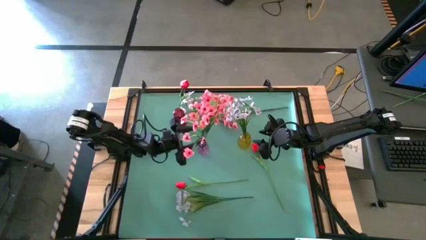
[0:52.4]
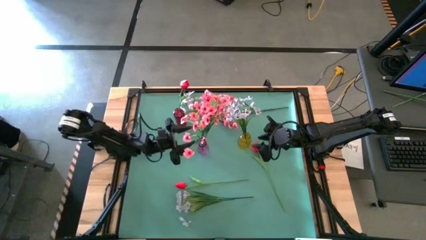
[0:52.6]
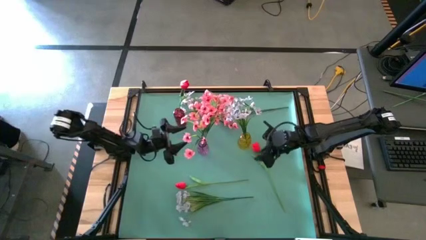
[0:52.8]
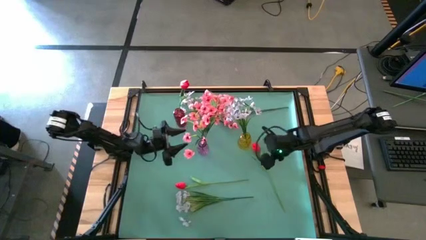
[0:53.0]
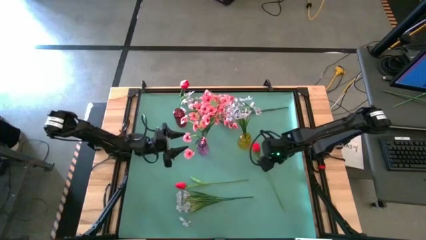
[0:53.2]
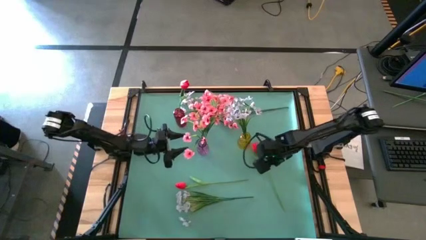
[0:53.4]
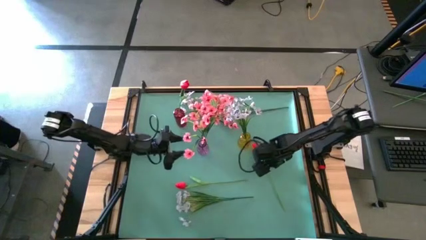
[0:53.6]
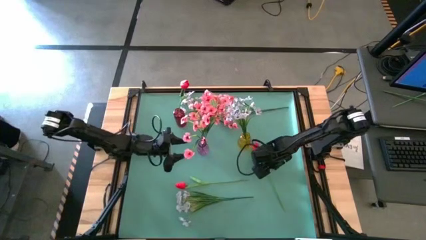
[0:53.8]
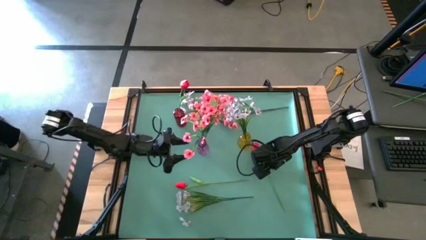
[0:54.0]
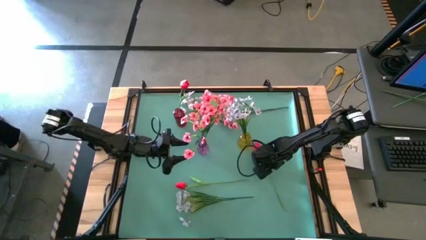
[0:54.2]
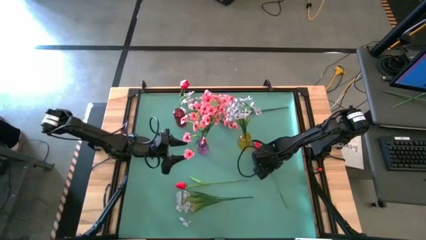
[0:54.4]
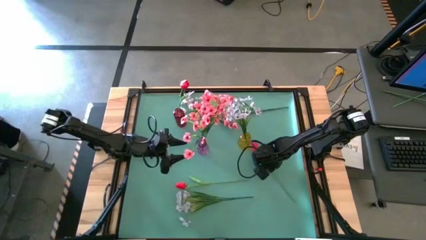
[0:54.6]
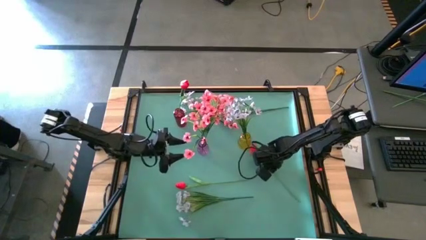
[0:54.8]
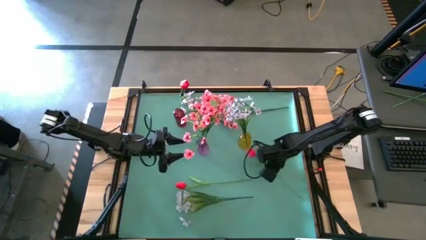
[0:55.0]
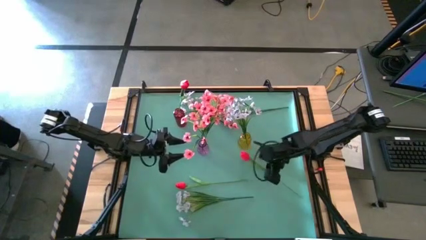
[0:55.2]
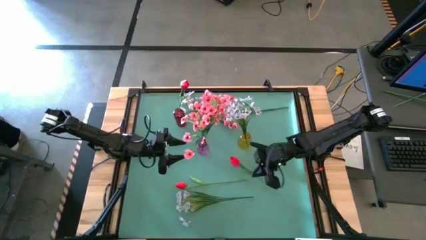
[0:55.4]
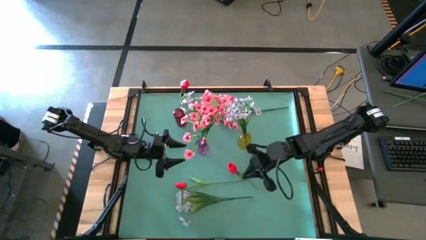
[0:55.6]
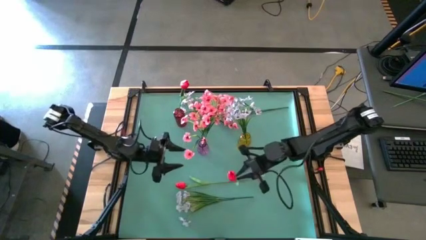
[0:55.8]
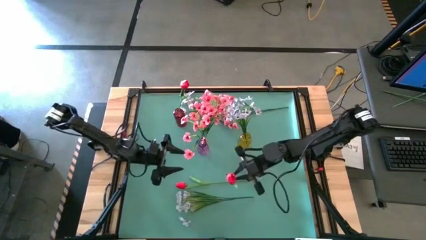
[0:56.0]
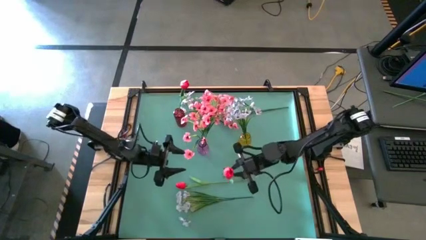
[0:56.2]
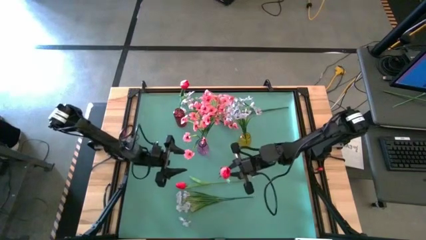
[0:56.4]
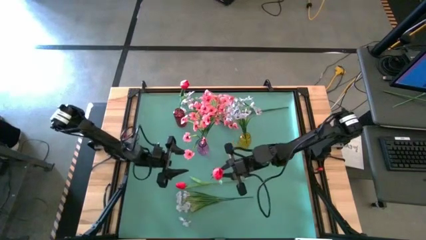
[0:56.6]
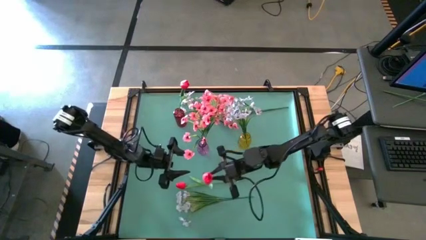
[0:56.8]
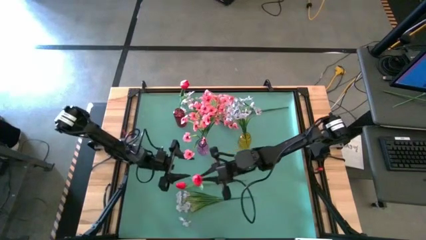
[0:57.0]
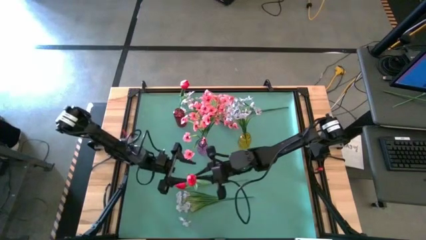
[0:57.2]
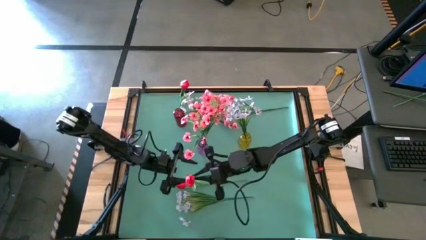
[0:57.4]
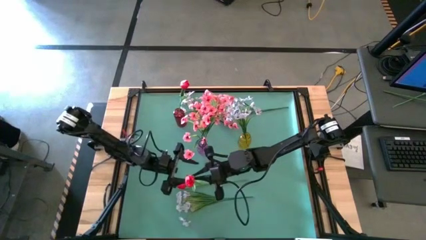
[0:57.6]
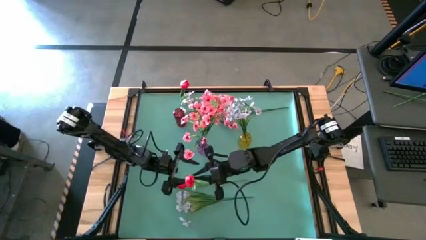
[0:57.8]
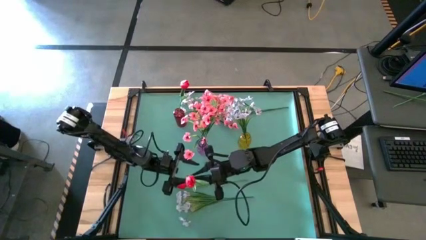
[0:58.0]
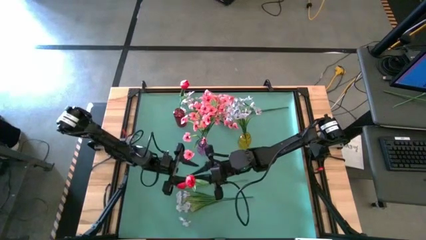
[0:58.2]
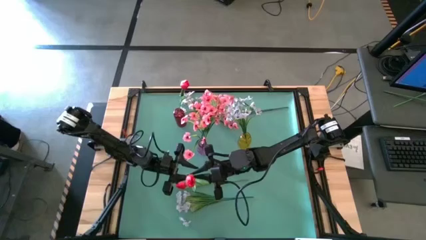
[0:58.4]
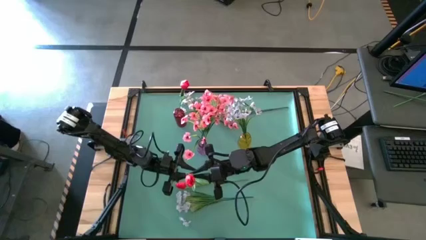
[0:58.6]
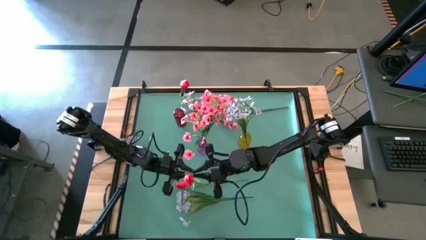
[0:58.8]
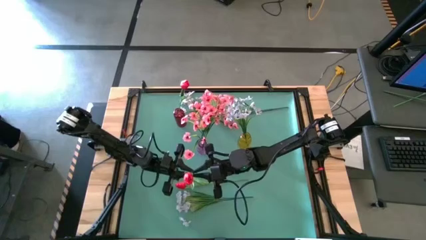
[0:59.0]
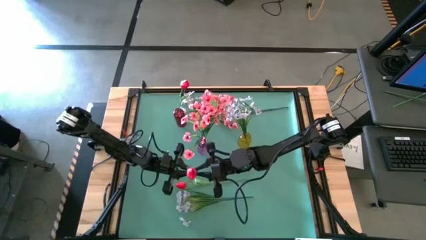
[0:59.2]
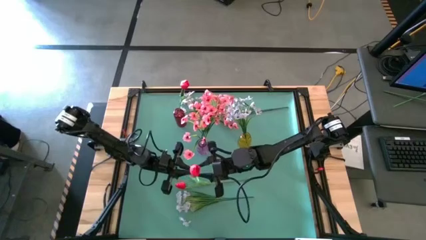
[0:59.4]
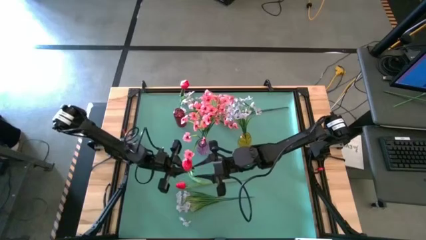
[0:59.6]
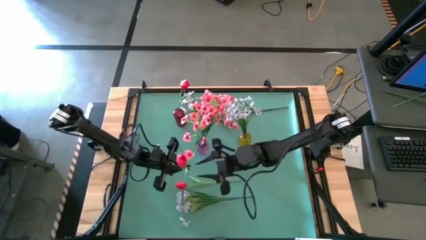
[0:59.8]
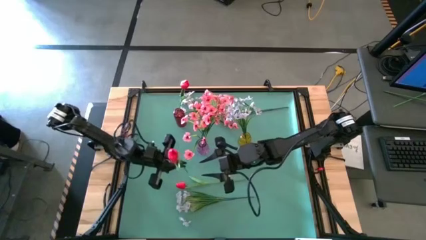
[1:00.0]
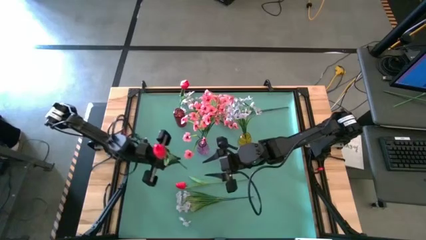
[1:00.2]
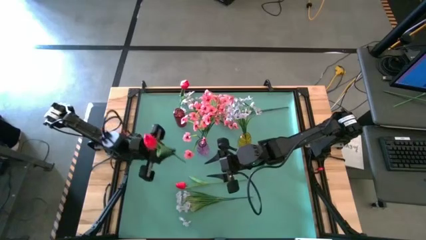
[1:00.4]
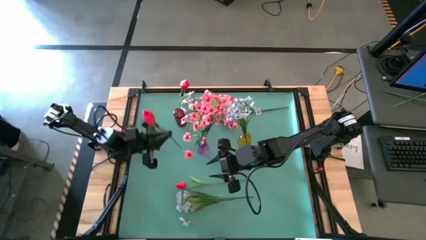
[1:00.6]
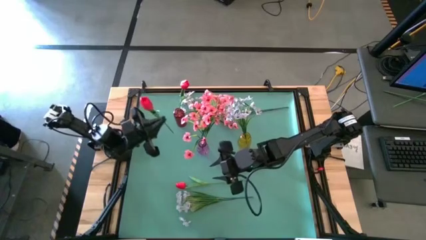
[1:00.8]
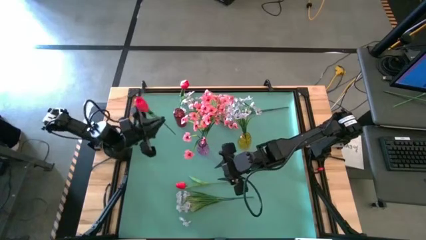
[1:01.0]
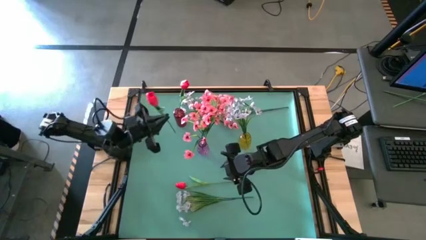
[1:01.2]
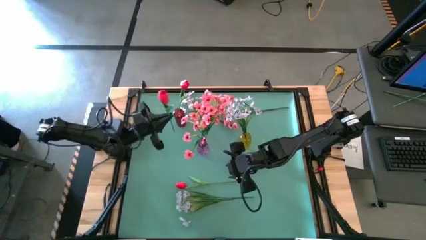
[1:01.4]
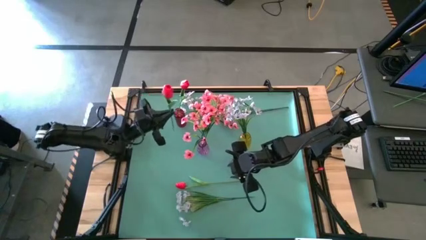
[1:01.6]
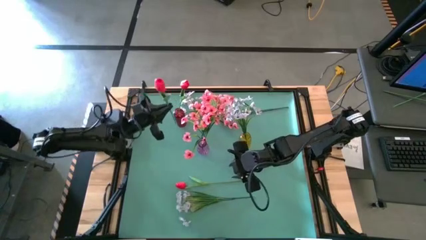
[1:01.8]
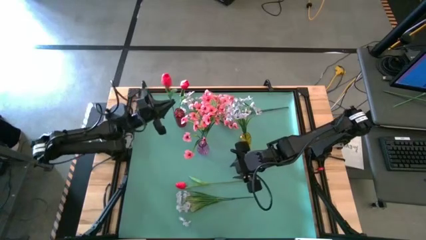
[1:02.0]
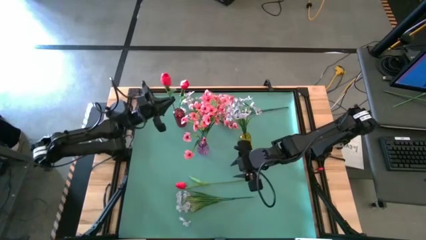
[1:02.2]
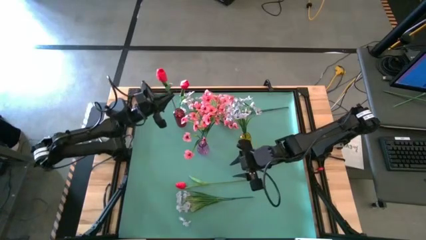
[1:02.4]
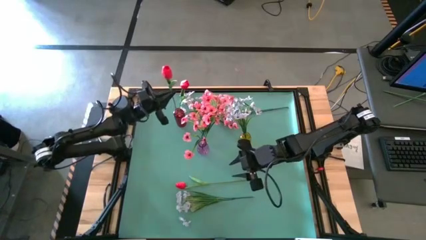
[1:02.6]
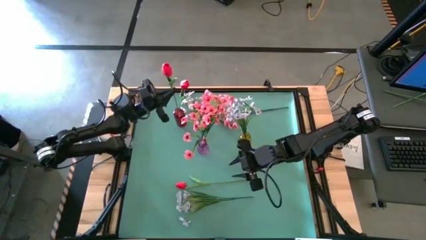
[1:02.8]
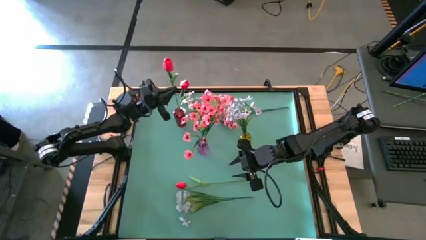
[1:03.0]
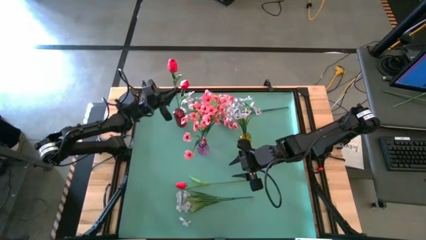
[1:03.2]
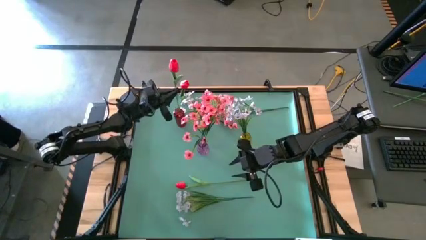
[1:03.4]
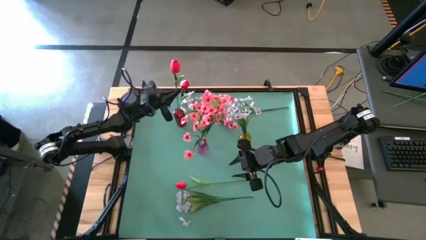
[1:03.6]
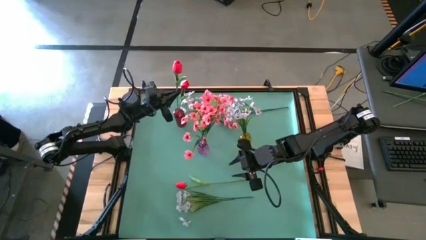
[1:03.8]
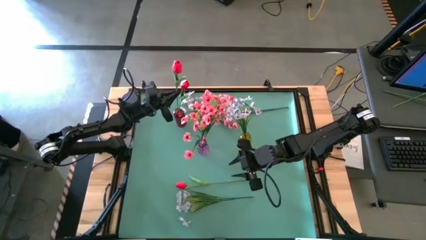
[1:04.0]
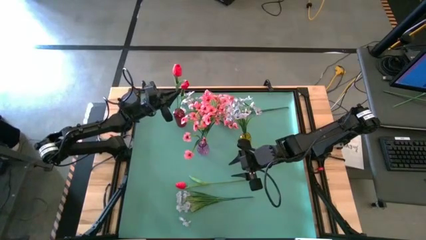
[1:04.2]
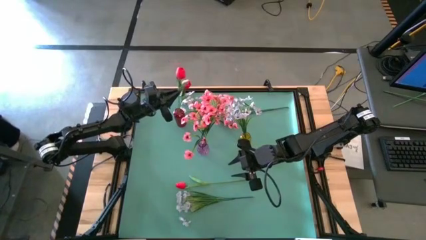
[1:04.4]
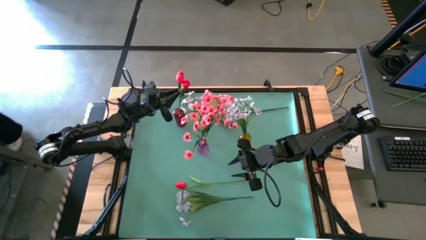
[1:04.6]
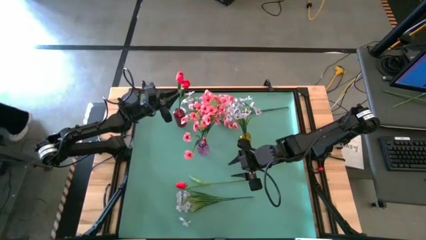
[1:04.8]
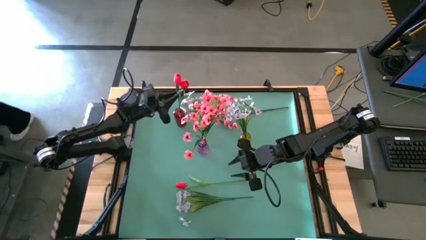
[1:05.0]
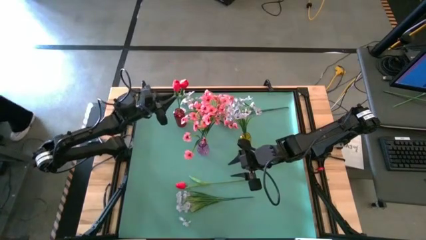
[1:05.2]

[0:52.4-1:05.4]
Task: Sort flowers into vase by color
Put the right red flower into the red vase

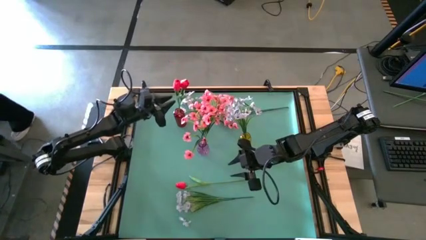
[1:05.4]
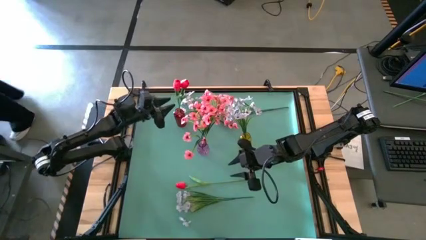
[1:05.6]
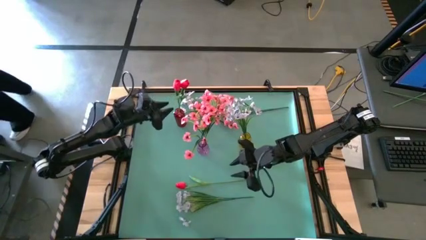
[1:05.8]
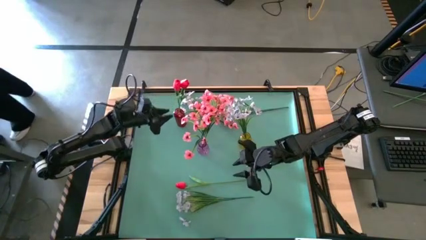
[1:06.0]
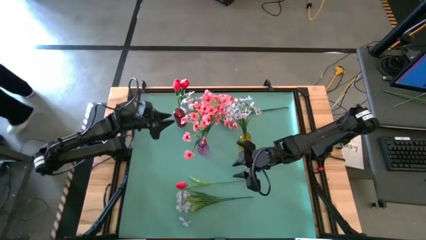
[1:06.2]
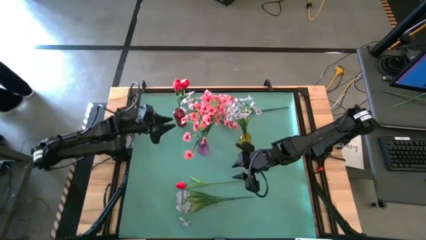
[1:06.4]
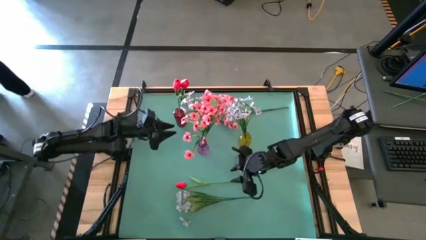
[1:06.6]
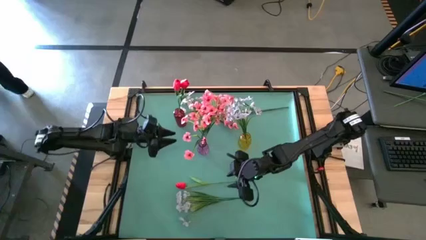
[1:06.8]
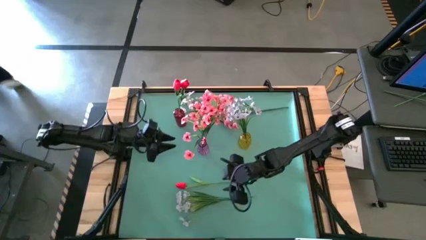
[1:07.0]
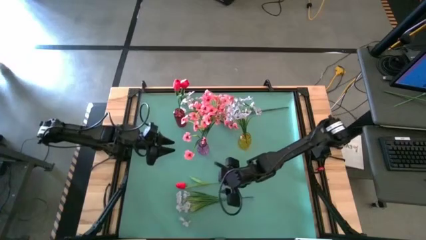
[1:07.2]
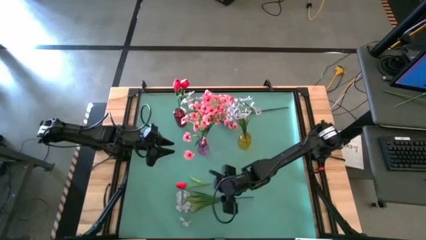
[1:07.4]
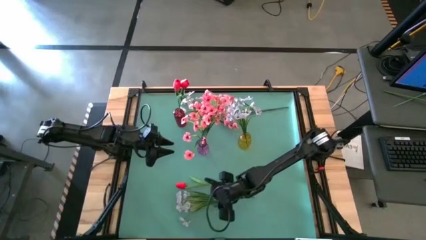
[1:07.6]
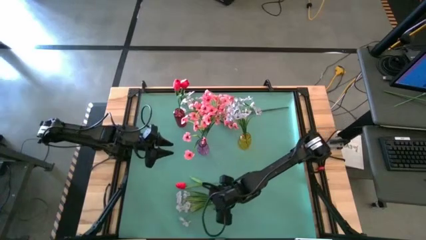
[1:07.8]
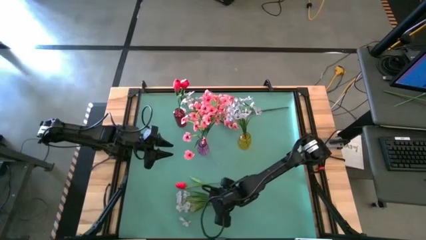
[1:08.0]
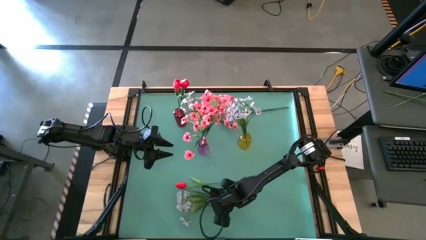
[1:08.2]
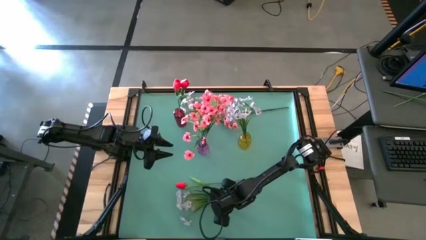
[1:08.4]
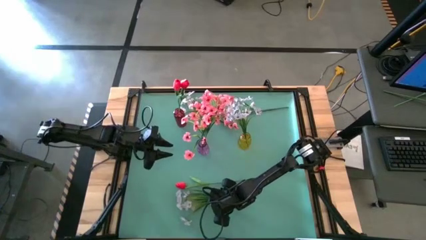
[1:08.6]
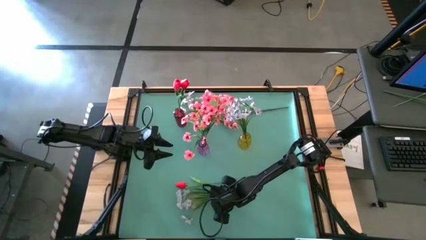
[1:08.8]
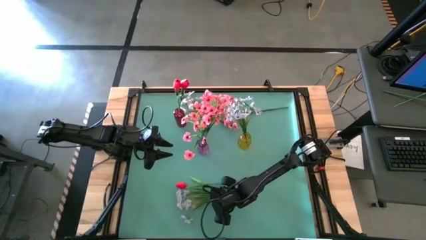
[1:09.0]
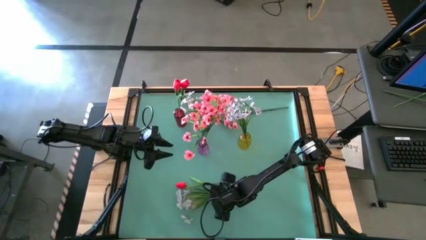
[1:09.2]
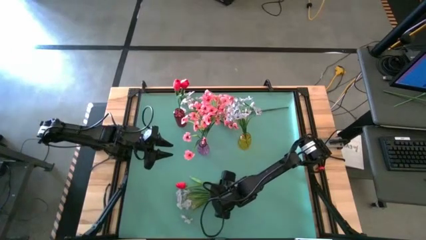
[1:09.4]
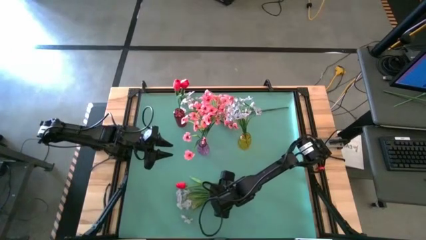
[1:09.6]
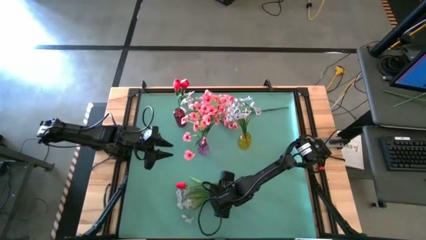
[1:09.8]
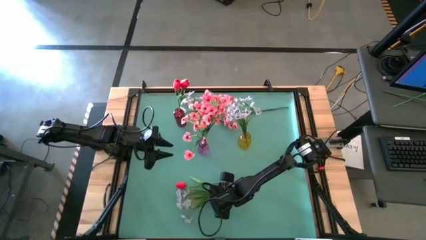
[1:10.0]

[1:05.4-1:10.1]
Put the bottom white flower into the yellow vase
